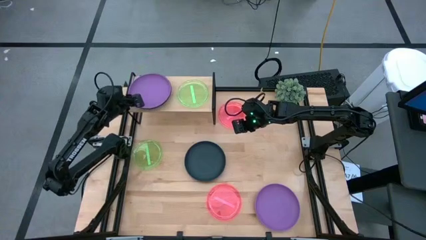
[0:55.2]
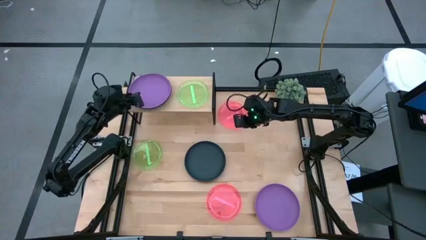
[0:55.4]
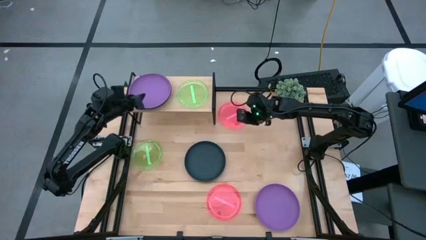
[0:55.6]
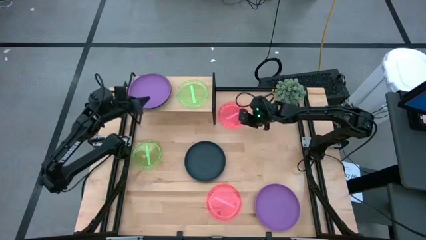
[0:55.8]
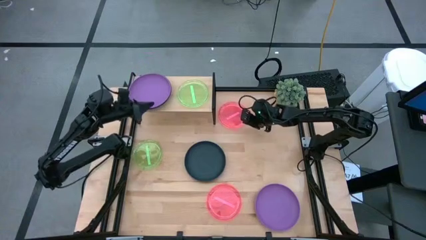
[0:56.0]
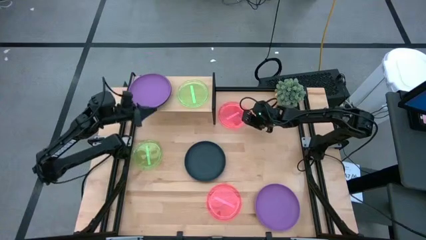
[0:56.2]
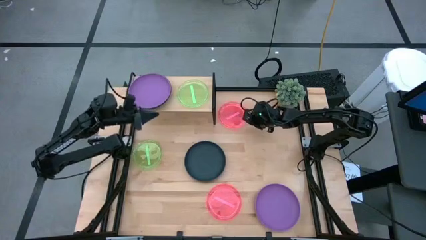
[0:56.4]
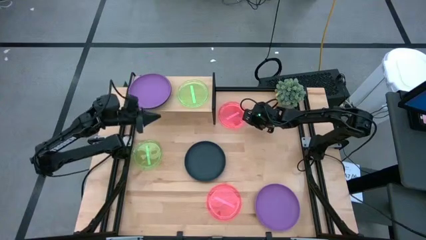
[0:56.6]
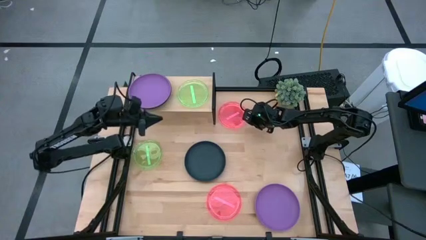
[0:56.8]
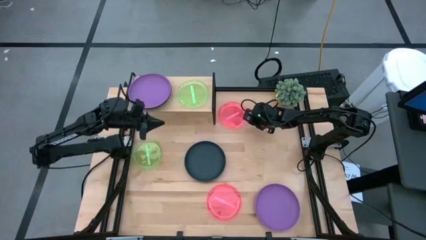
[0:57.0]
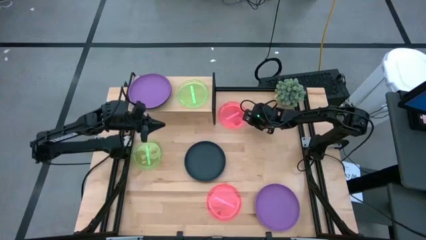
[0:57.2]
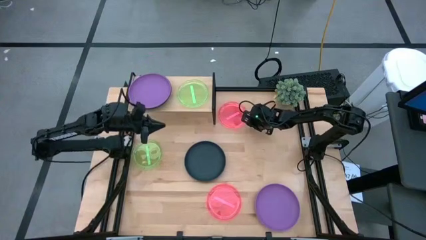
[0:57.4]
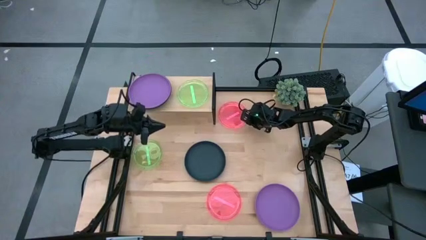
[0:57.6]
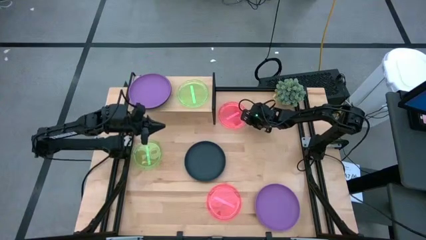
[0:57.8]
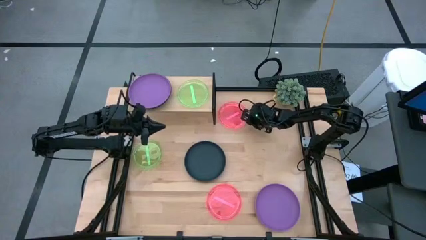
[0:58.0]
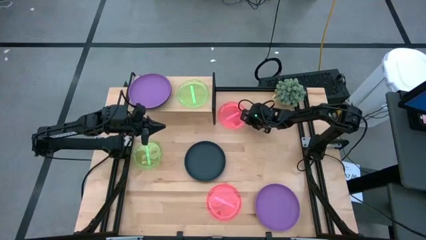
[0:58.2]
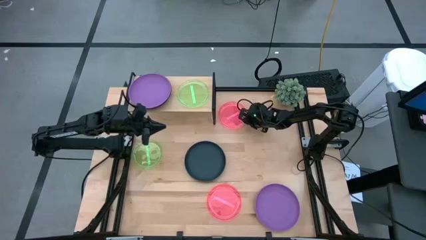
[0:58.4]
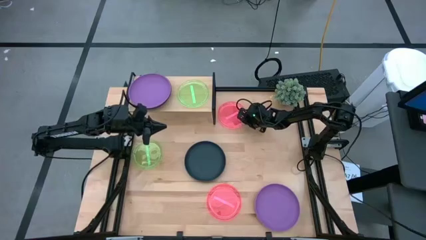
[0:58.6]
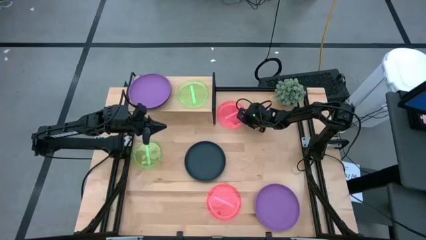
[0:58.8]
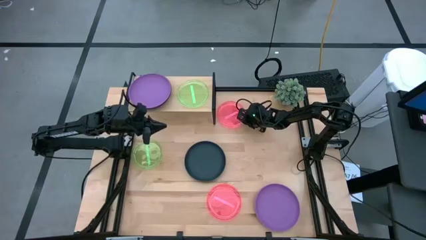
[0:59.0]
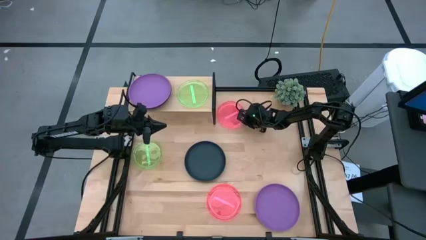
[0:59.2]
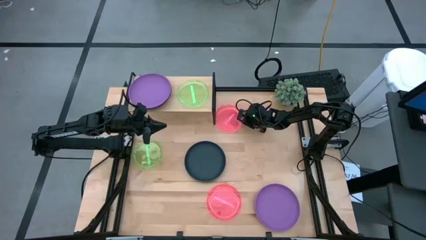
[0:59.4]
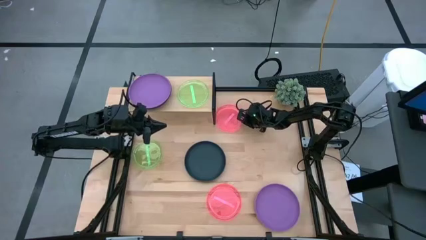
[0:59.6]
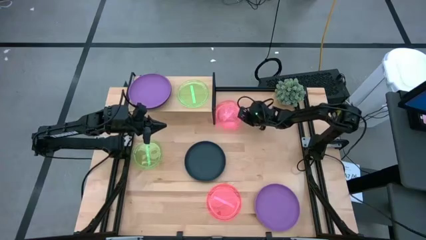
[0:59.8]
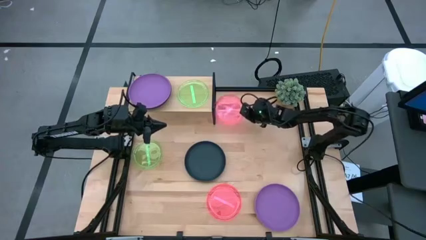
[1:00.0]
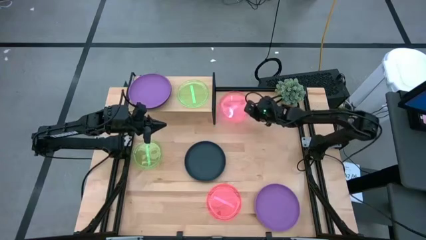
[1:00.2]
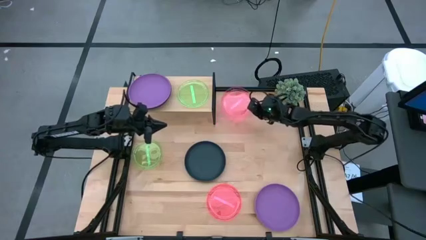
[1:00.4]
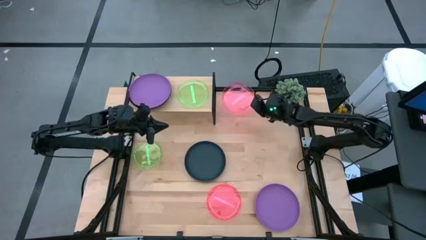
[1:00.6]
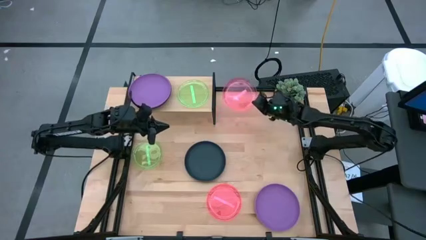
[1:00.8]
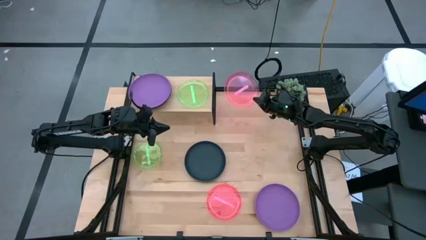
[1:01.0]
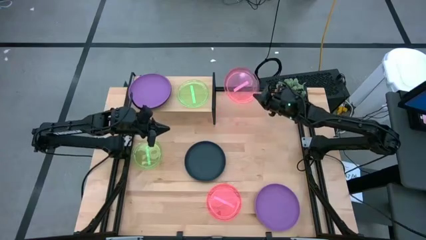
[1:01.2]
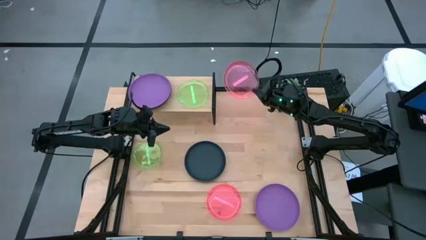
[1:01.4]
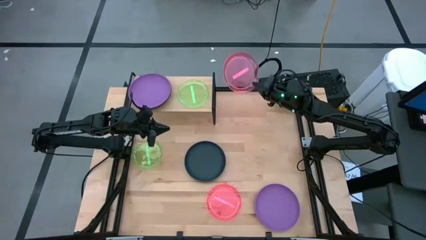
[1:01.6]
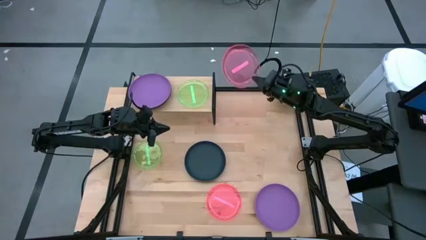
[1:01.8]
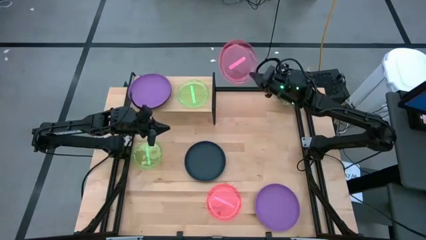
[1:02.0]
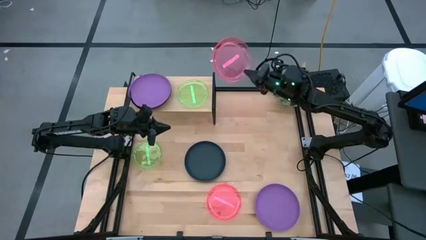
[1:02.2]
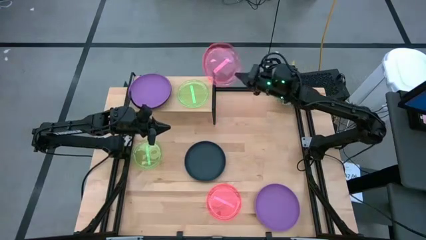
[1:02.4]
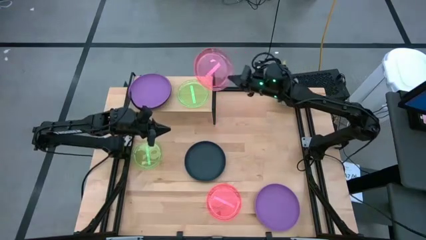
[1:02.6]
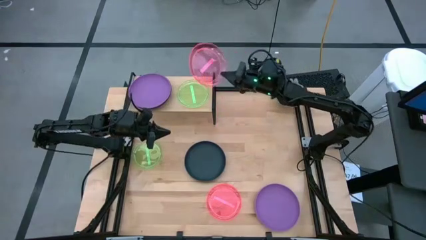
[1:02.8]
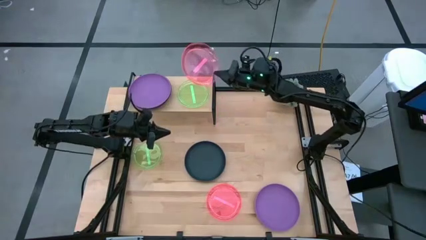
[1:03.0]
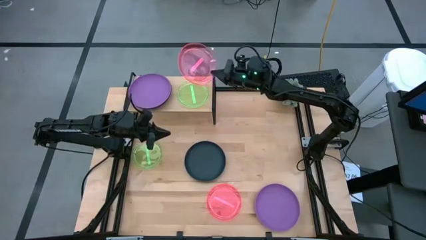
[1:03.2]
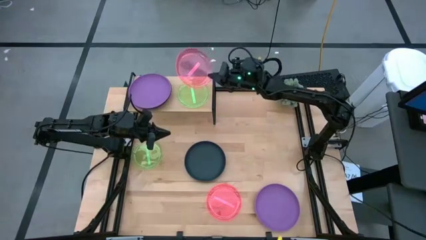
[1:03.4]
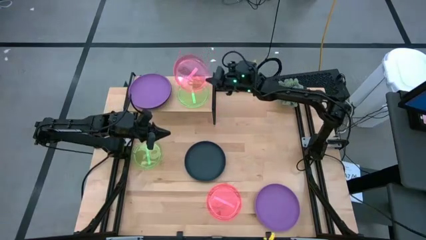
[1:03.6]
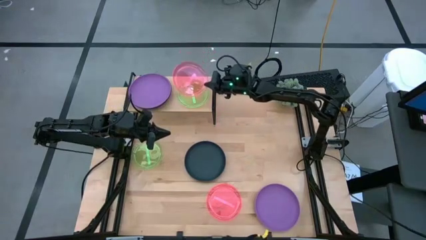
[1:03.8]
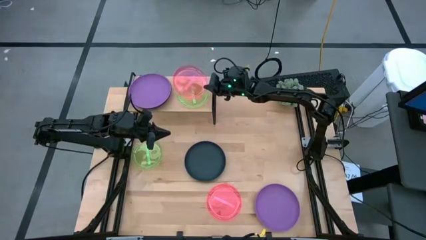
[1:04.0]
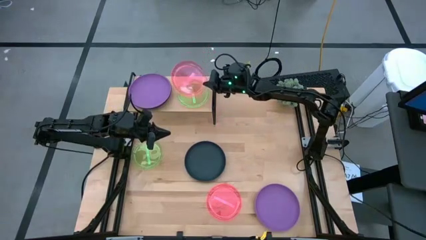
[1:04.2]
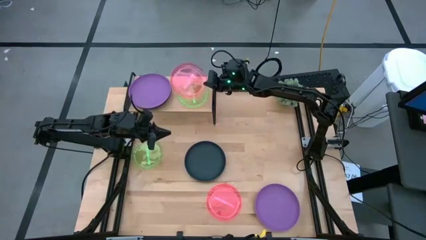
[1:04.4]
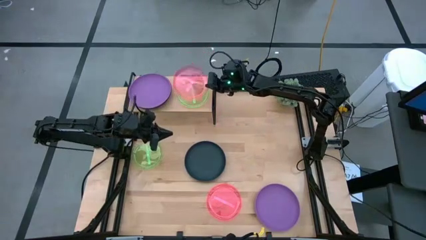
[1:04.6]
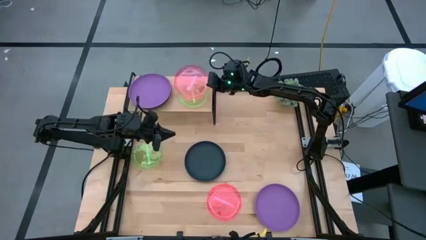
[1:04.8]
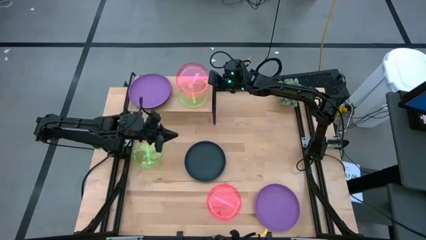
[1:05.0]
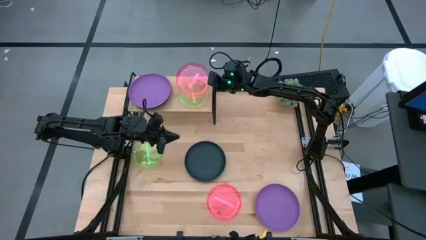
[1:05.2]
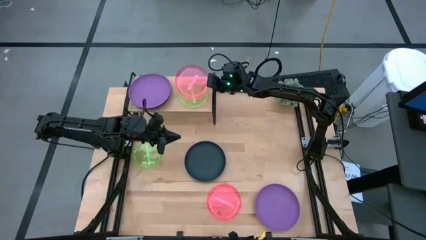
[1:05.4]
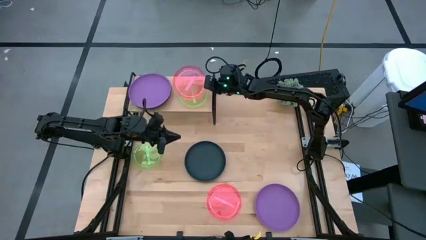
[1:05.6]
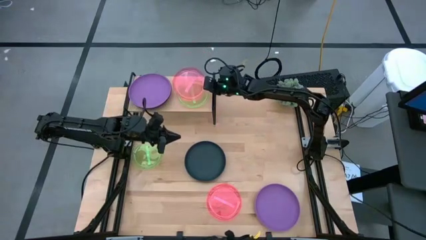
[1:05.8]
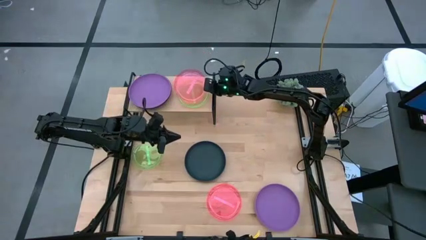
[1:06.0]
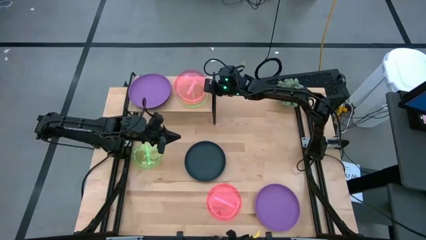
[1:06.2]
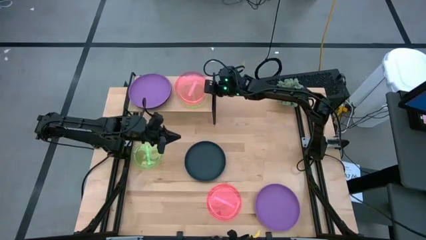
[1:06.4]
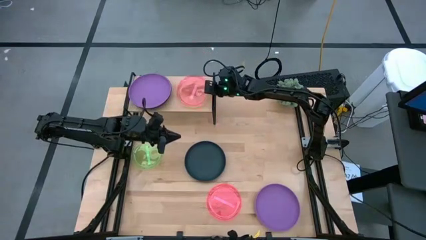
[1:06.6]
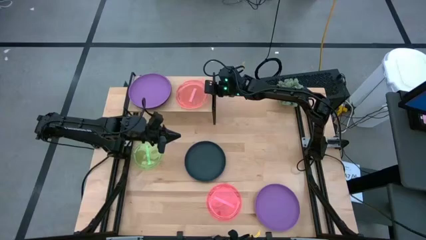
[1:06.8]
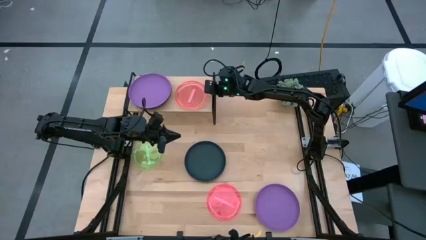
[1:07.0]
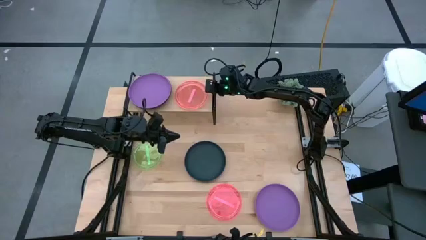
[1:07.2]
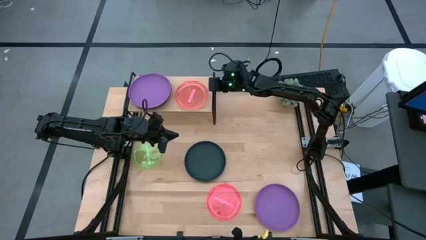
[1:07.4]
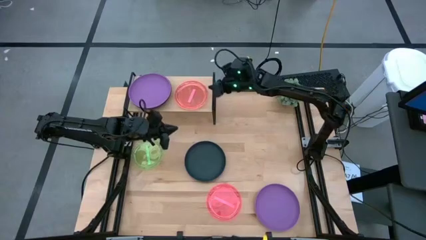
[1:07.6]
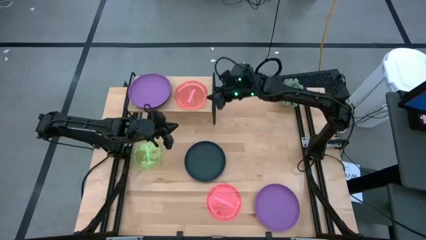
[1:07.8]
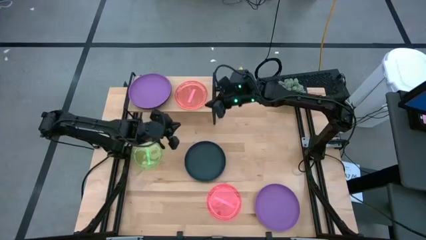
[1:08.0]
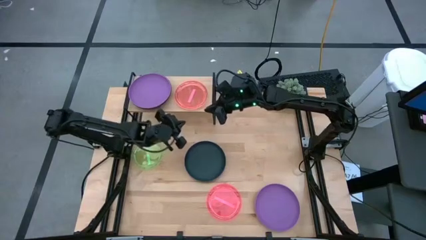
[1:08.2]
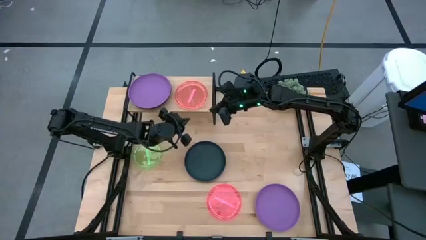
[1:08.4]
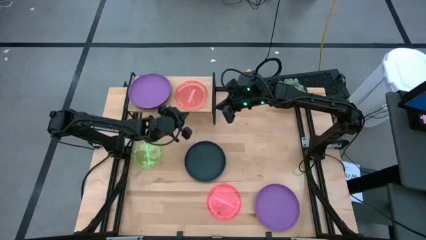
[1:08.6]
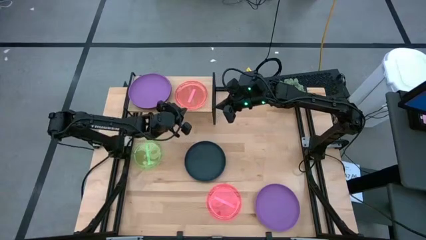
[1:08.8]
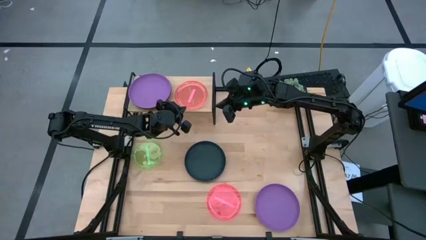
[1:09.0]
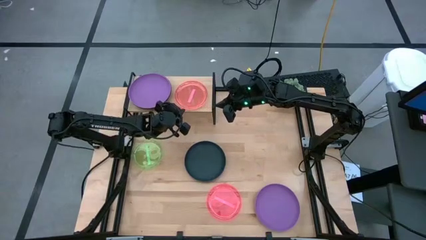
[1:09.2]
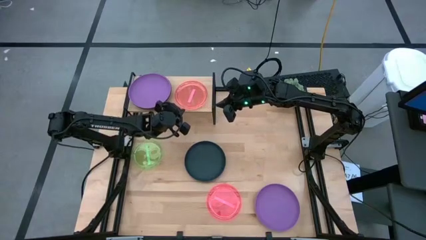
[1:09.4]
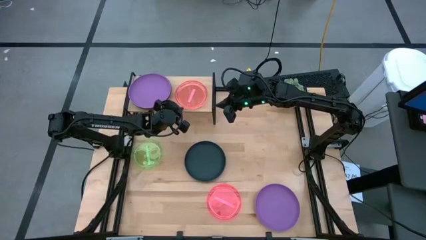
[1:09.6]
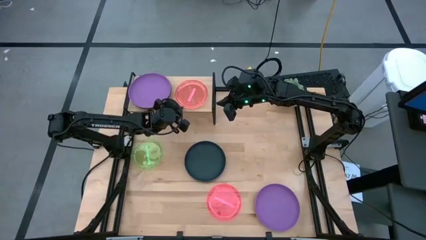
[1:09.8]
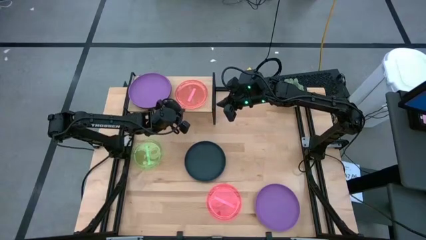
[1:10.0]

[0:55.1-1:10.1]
Task: Place and stack plates onto a shelf
Stack the top pink plate on the green plate

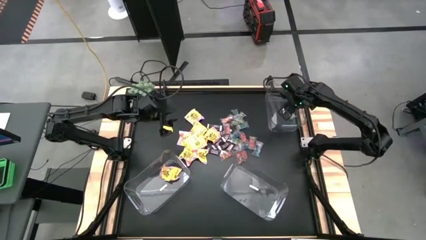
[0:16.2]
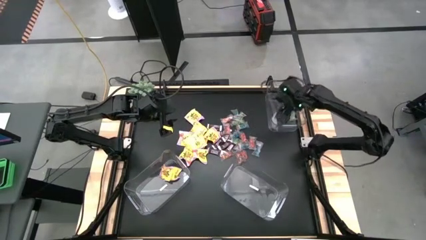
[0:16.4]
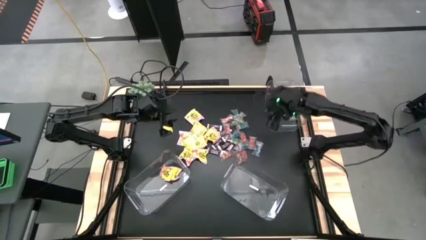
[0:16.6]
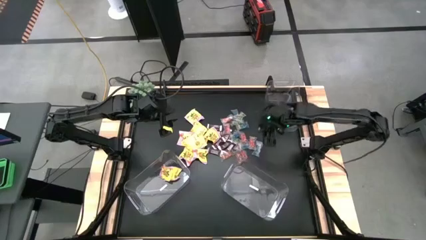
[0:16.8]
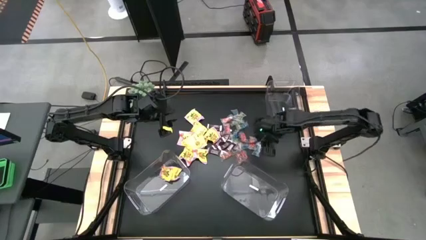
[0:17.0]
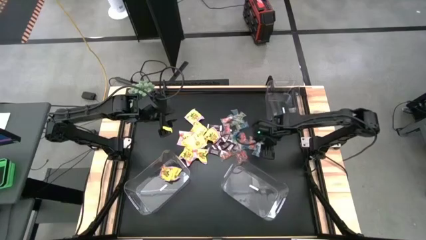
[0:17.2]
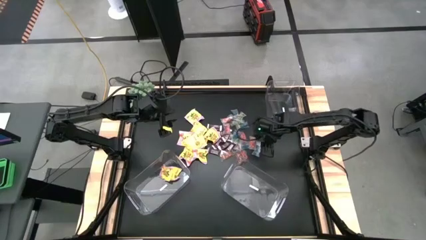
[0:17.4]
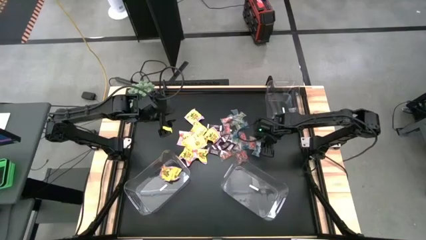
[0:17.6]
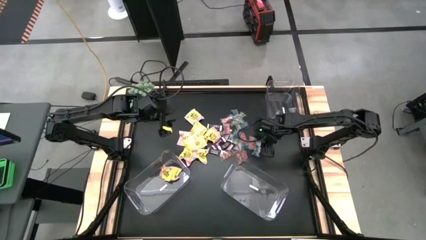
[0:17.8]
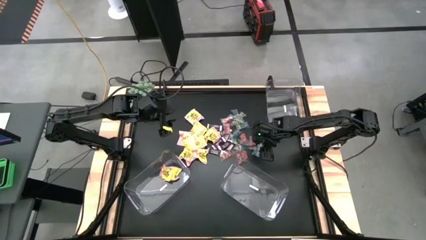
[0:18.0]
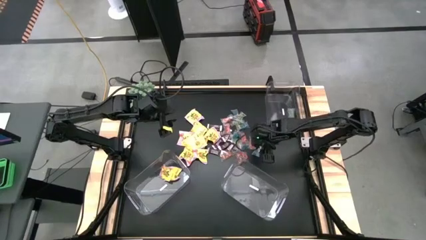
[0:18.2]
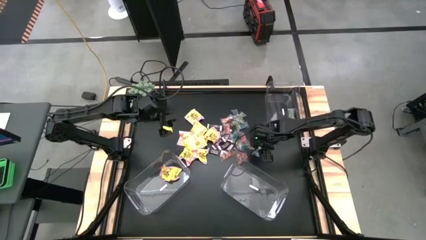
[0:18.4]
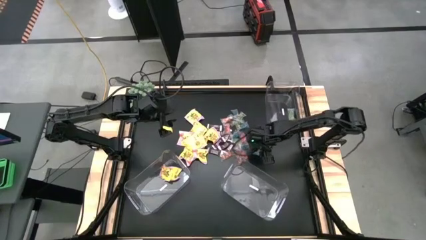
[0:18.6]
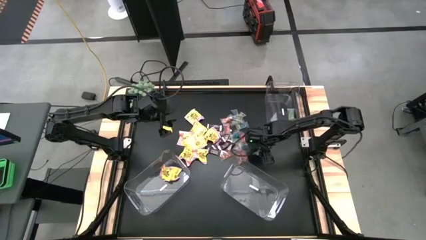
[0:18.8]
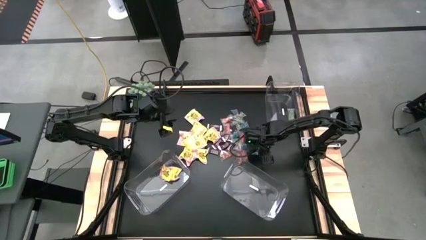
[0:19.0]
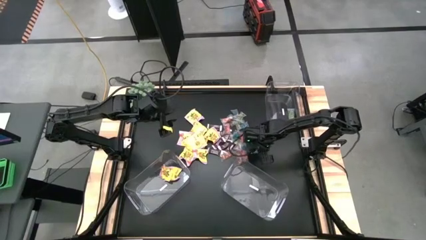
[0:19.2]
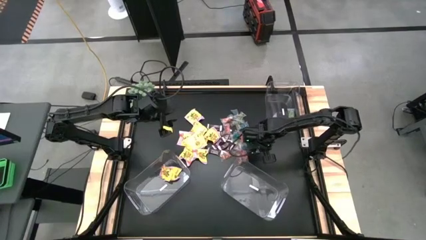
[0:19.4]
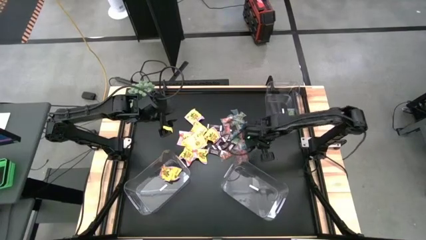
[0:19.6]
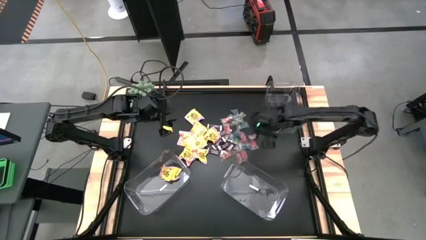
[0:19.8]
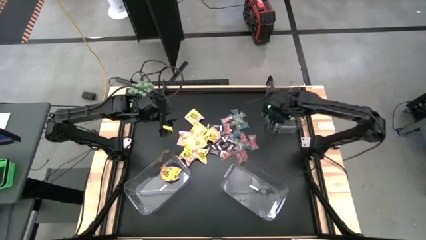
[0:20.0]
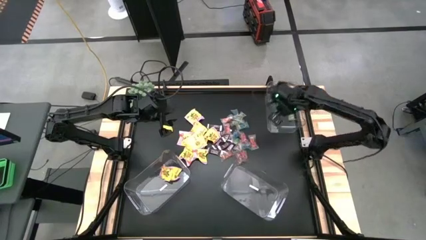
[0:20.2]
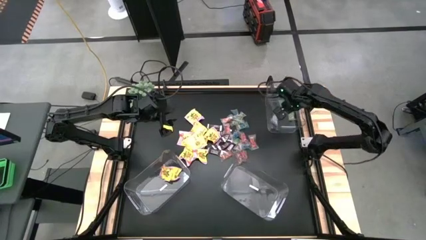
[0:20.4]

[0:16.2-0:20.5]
Task: Sort candy
Put the blue candy in the top right transparent container
